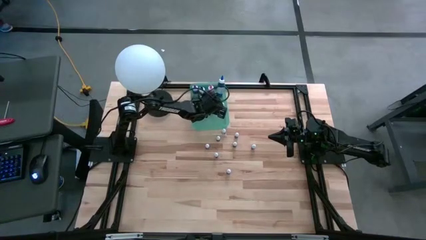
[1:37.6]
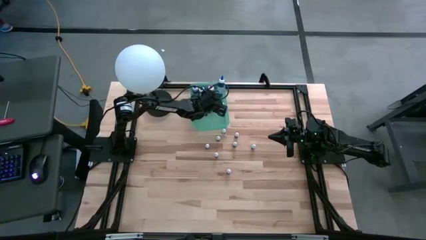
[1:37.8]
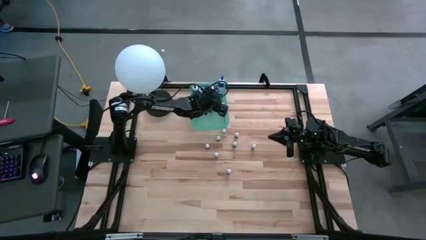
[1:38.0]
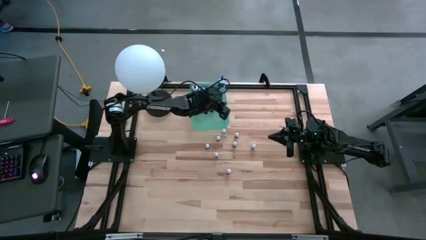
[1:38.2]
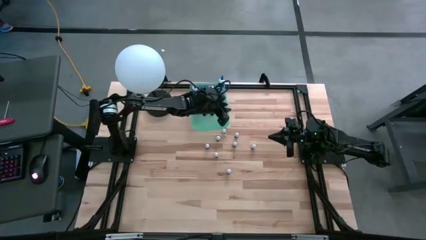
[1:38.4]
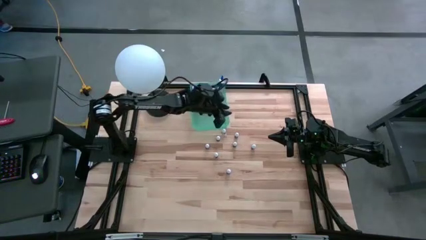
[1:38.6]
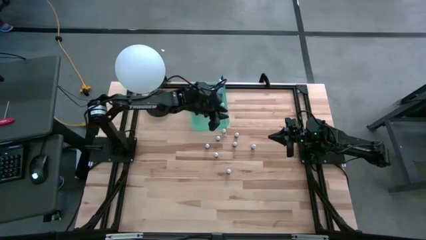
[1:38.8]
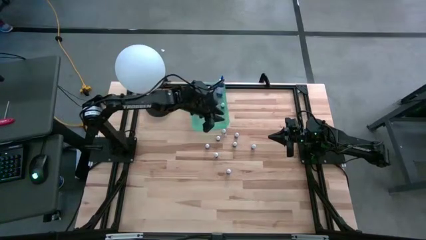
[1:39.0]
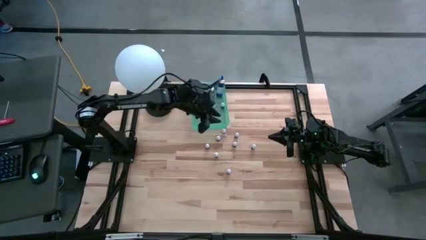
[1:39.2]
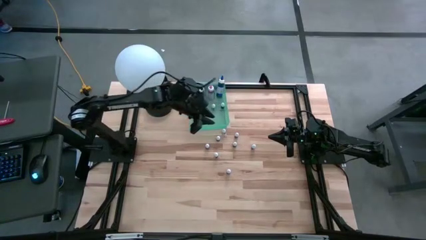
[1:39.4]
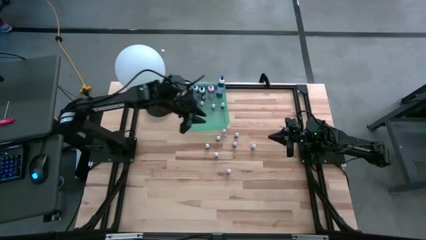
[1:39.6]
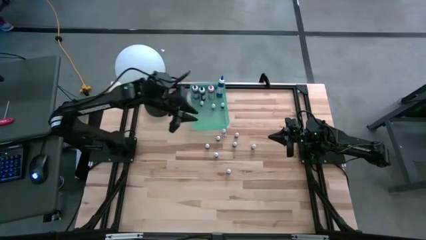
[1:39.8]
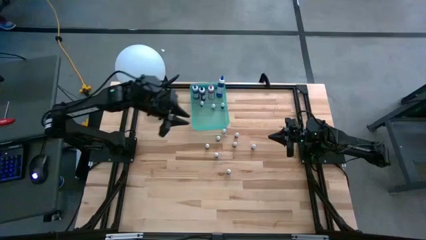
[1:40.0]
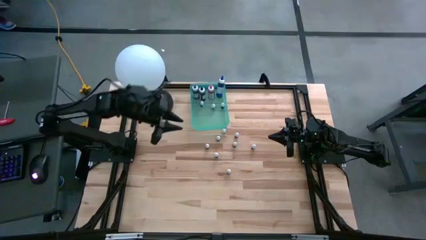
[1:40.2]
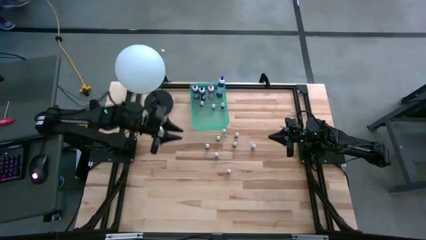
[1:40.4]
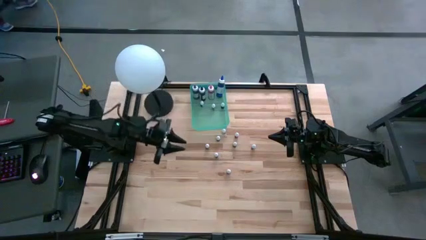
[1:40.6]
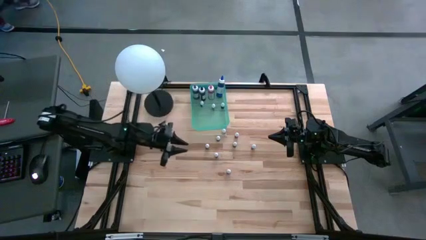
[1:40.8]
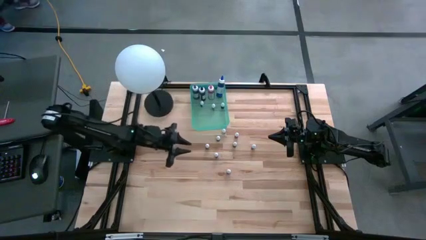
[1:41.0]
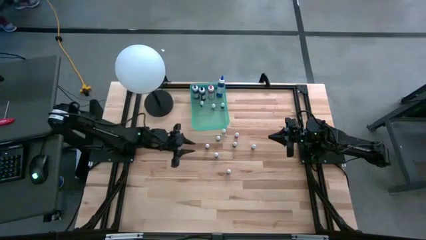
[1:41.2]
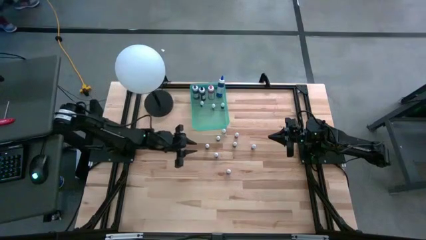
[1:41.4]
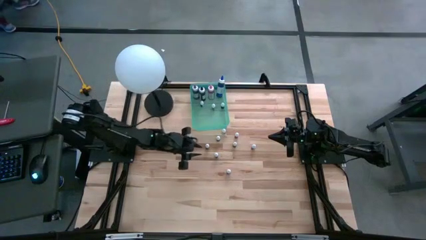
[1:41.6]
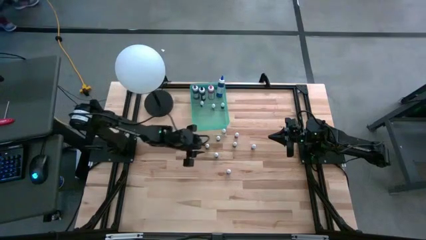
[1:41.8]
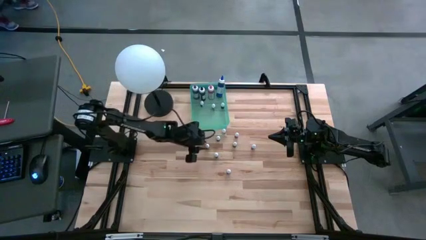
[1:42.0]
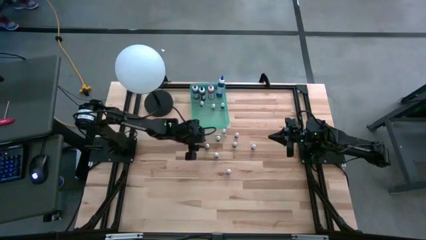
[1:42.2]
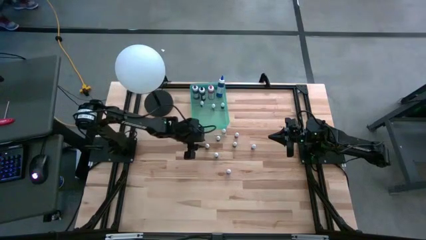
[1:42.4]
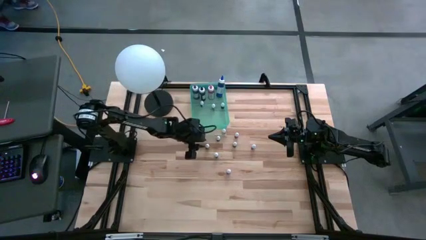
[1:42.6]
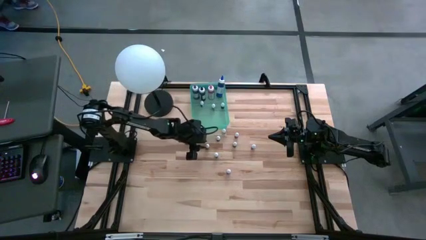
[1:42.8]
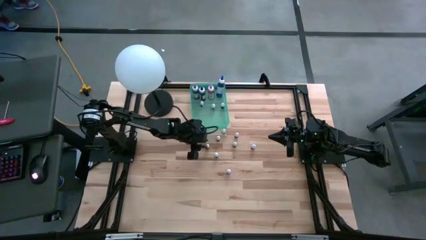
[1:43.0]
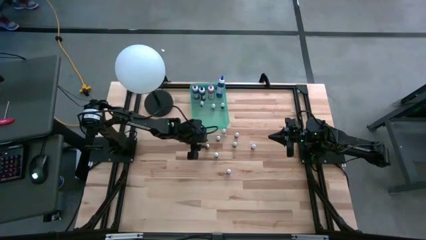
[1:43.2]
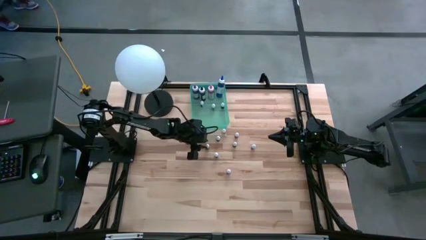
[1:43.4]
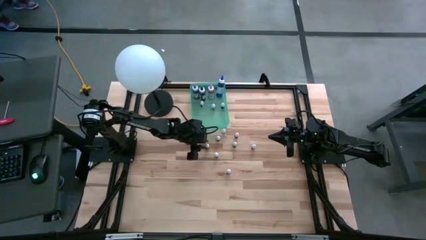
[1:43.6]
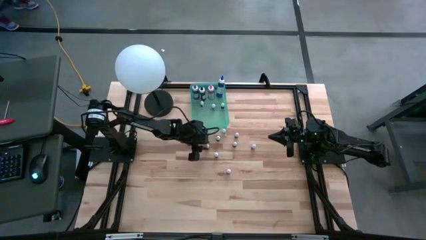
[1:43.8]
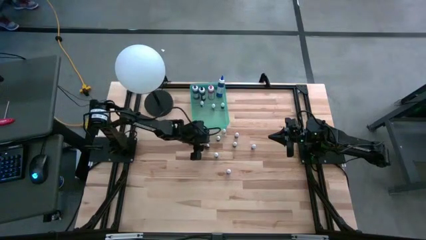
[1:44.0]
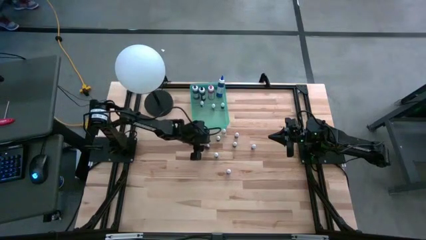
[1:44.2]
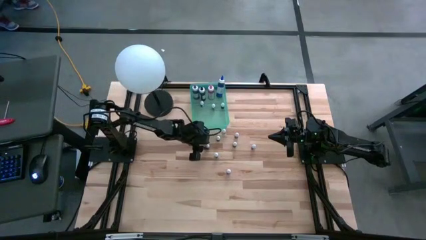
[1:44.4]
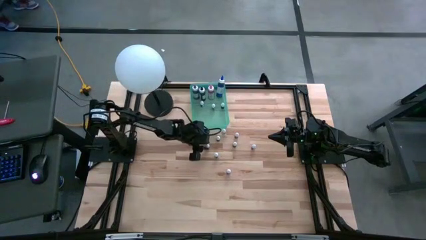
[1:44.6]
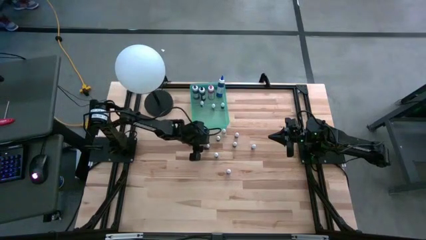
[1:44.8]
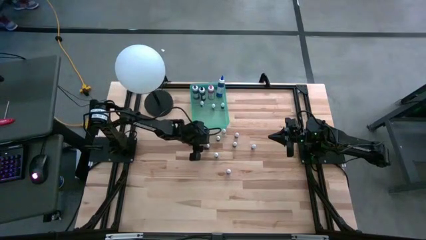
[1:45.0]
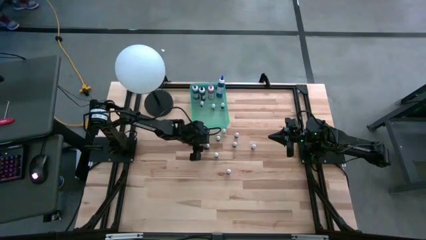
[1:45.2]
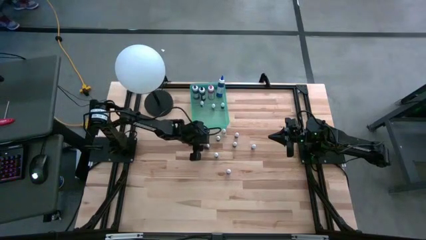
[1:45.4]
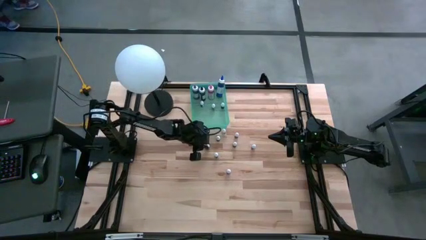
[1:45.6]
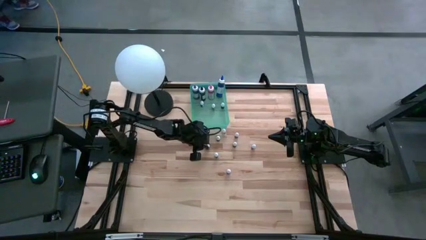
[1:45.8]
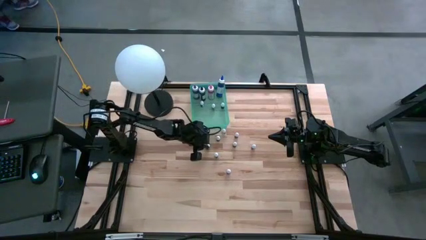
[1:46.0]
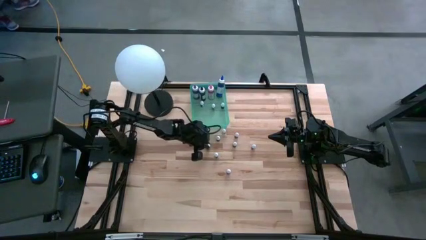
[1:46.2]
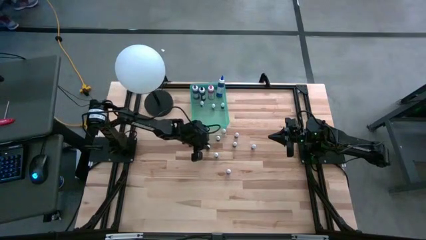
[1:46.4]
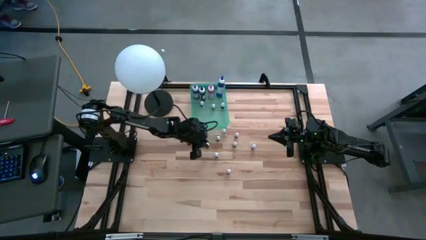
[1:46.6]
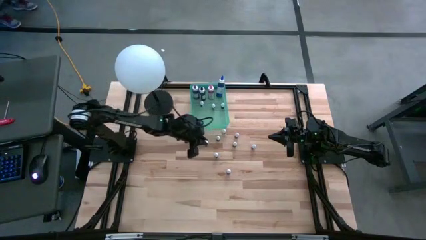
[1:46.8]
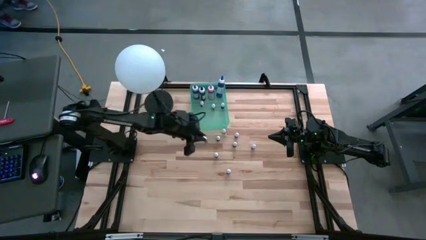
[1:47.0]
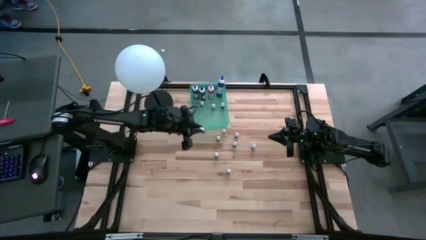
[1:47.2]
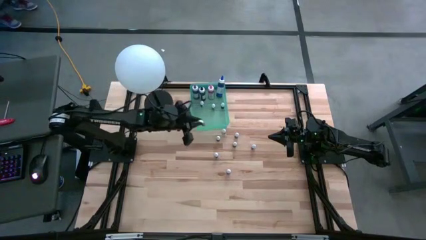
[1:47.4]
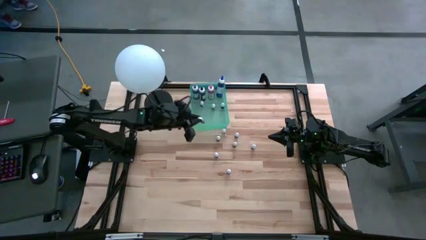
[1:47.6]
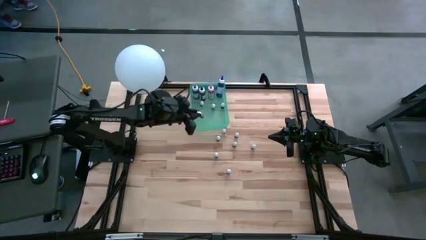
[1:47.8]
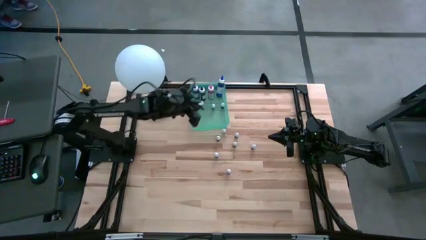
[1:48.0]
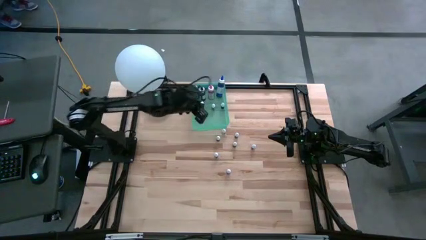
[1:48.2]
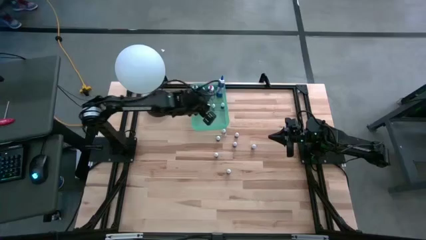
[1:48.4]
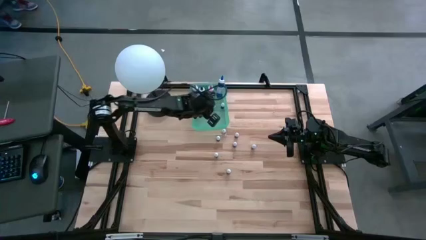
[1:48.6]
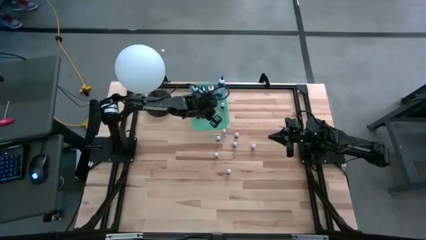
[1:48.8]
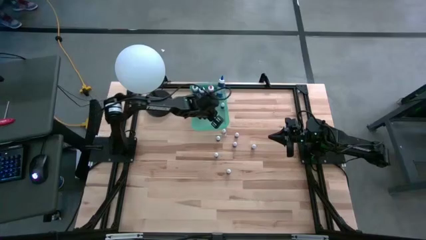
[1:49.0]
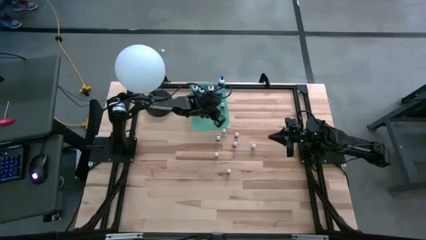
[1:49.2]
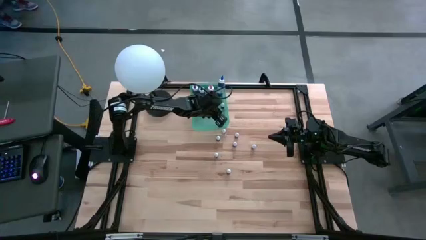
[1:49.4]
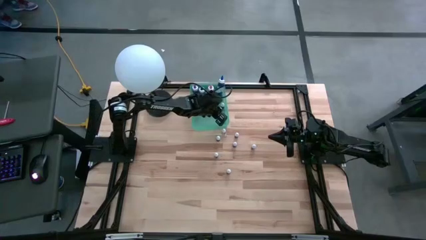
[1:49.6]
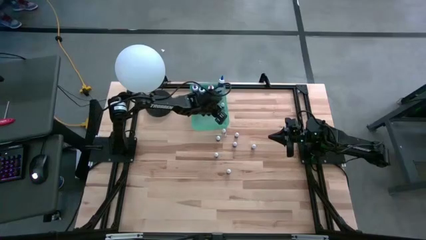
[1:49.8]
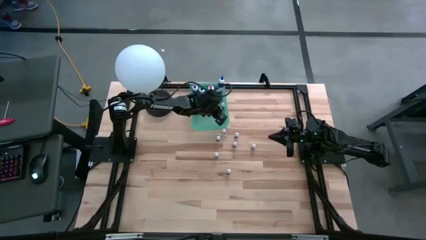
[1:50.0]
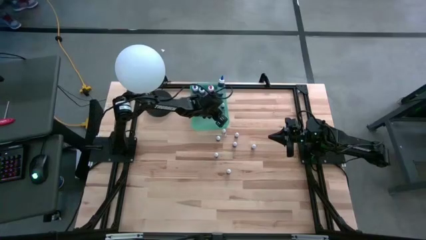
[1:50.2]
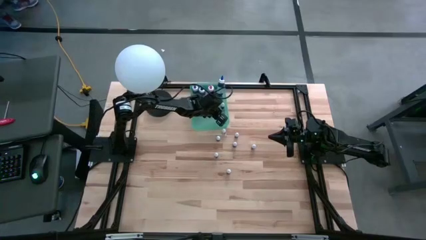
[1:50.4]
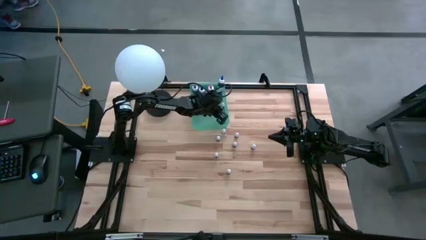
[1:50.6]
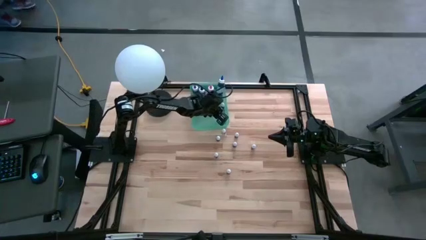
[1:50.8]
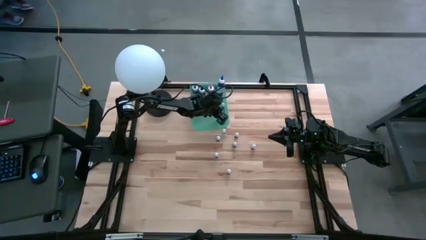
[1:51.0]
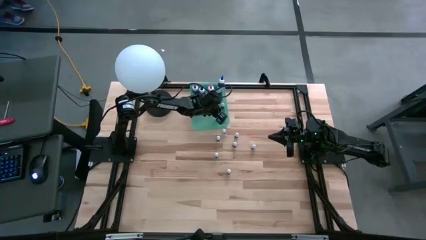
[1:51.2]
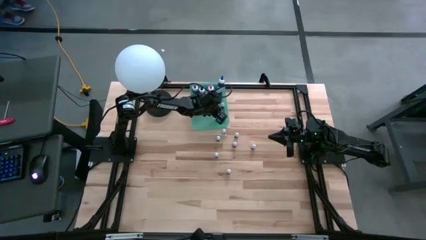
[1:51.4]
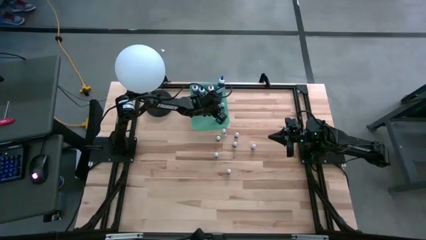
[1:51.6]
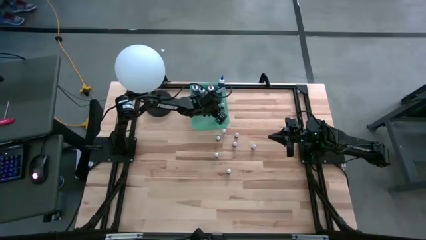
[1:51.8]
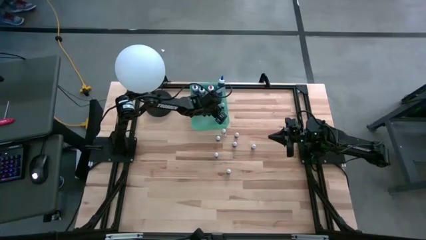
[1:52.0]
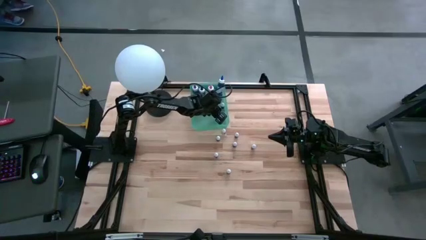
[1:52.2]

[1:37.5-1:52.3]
Task: Pick & Place food coloring
Put the small green food coloring bottle into the blue bin

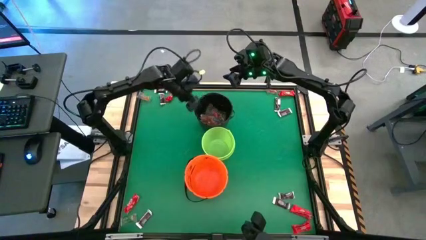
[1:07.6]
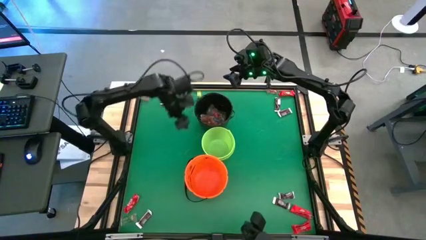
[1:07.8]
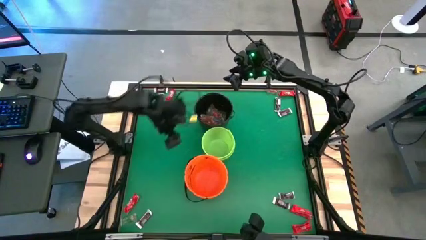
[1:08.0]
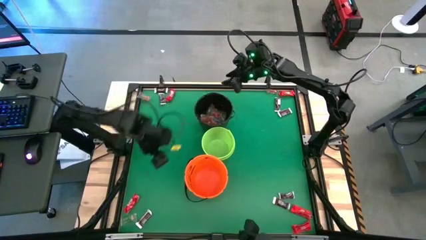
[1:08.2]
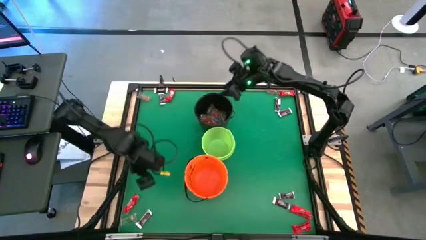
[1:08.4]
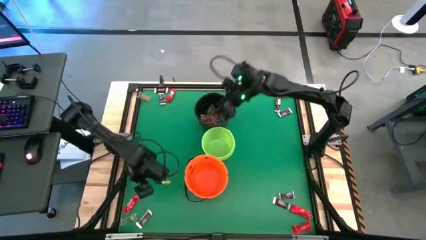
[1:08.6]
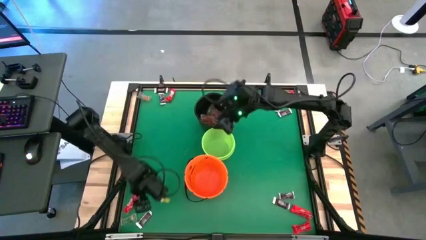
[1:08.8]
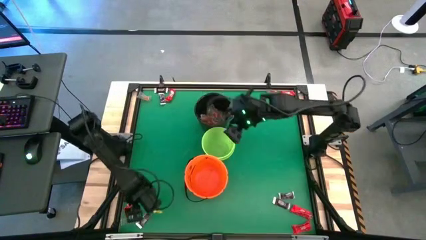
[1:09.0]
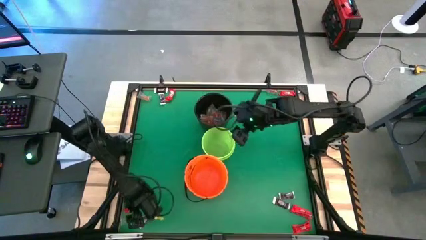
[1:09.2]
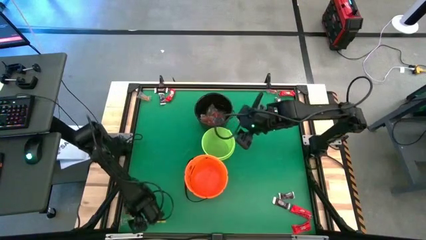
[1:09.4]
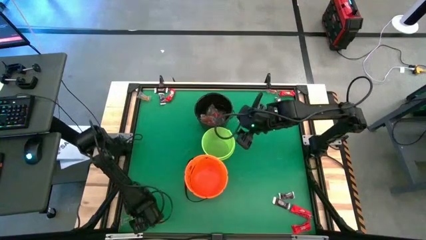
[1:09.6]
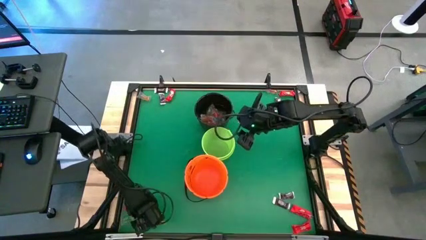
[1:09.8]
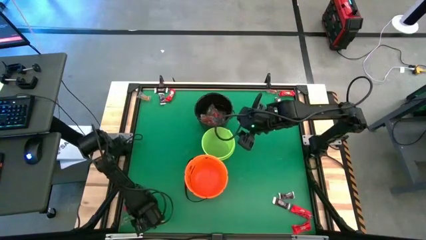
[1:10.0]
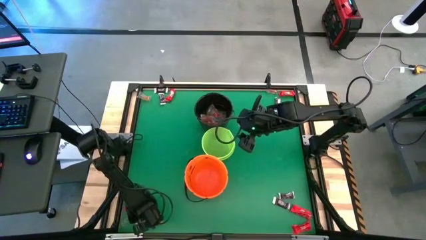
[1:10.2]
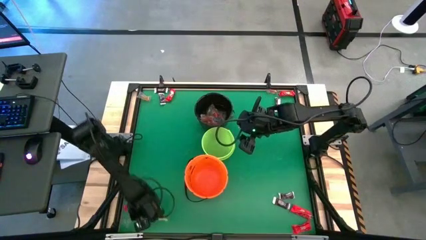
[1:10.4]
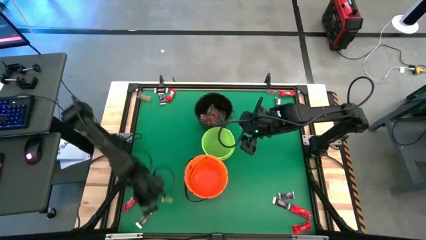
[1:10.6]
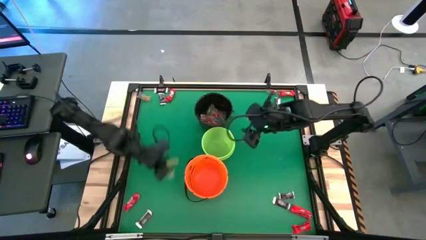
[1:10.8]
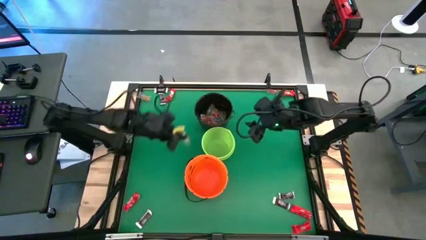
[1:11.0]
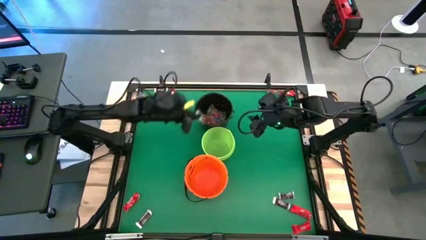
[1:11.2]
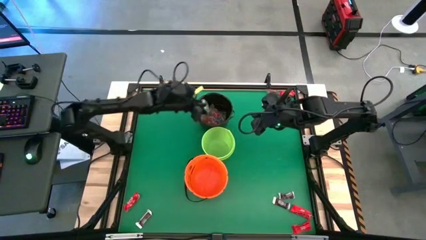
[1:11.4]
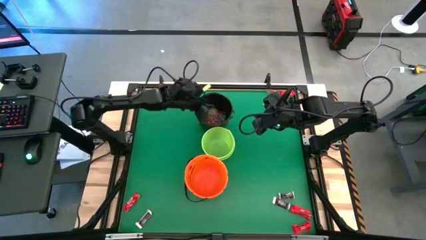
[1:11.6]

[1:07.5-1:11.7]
Task: Sort candy by brand, put in halloween buckets
Put the green gummy into the black bucket
